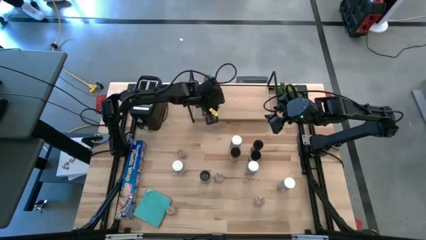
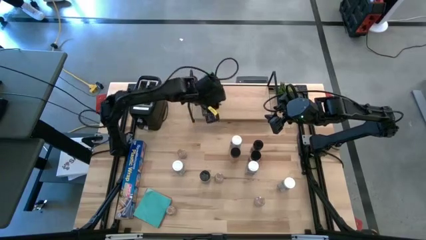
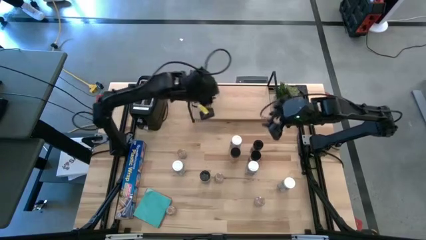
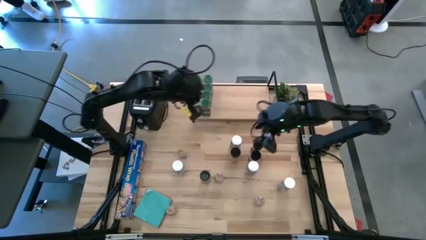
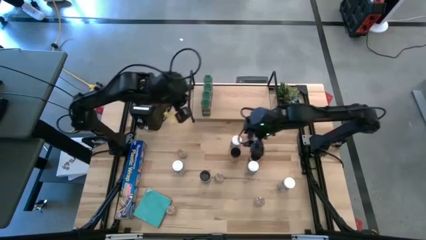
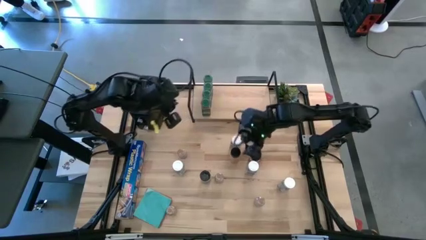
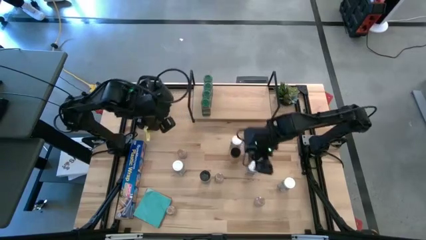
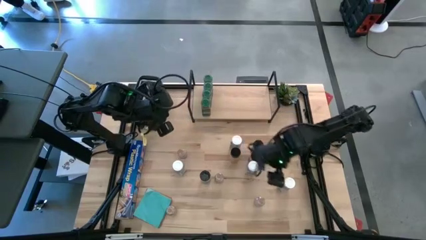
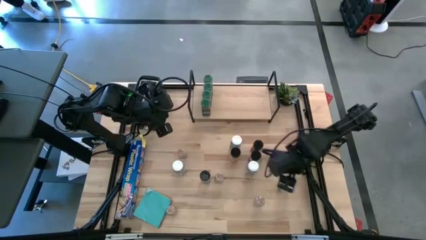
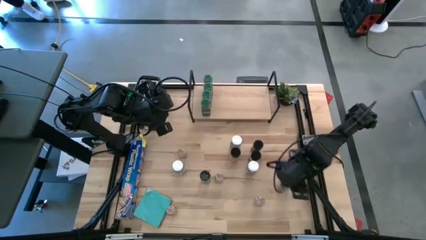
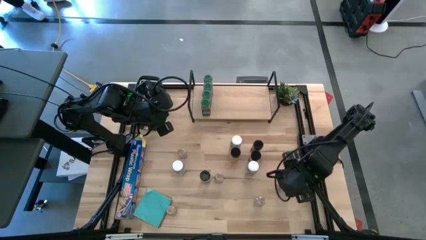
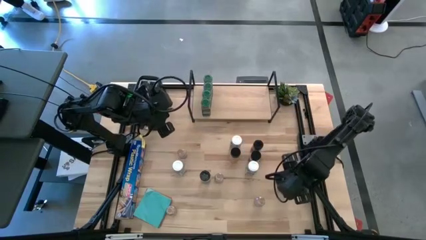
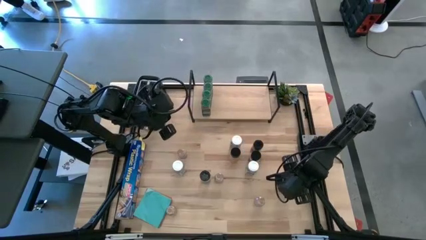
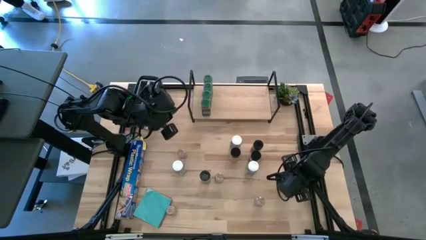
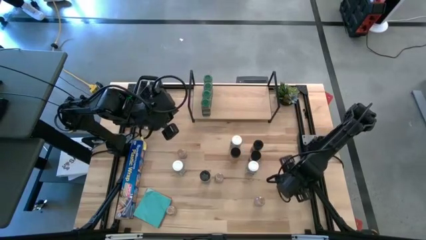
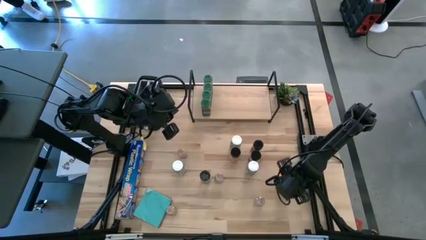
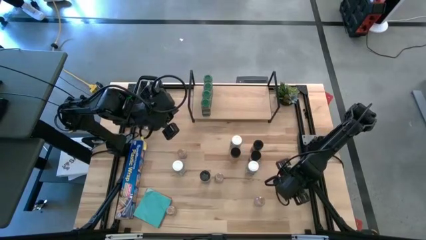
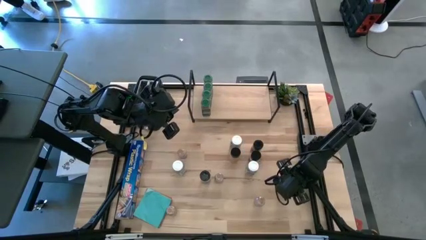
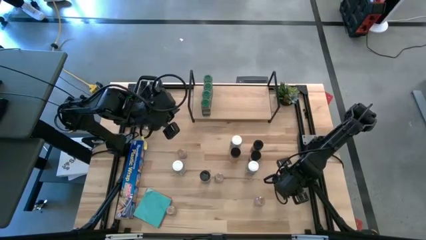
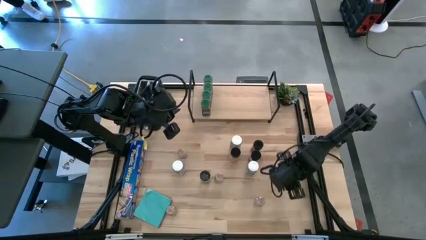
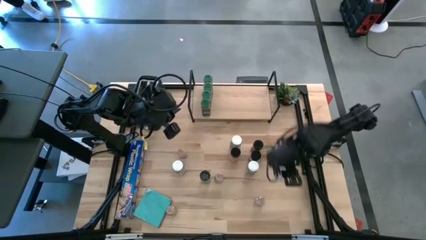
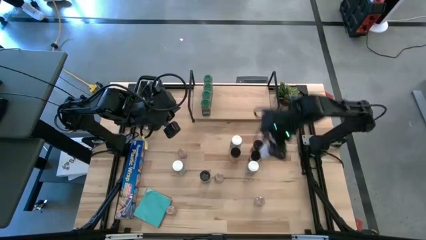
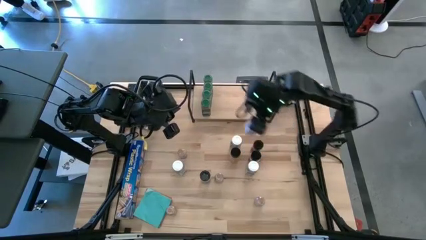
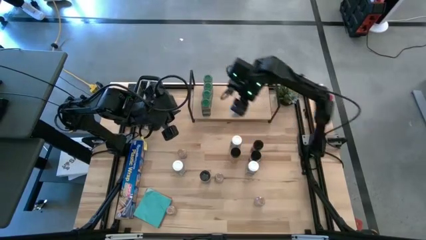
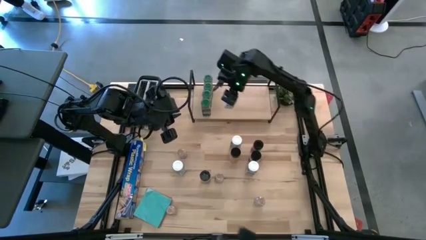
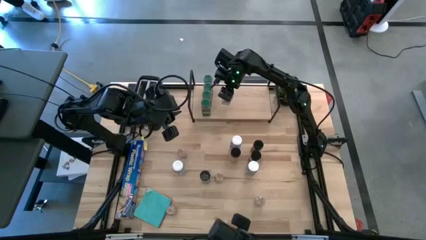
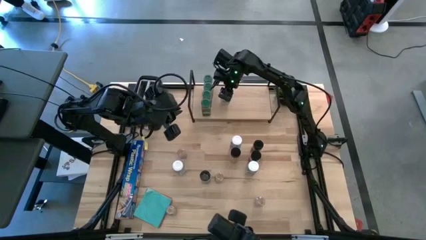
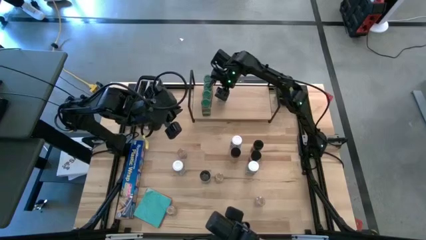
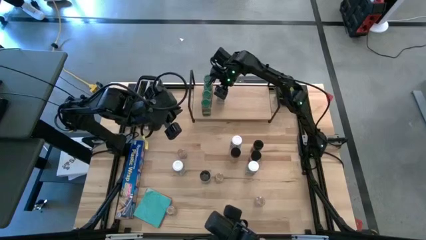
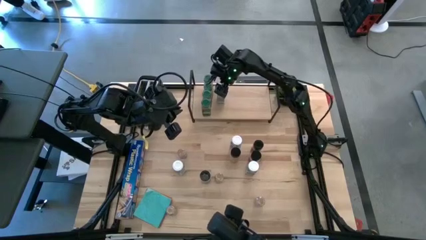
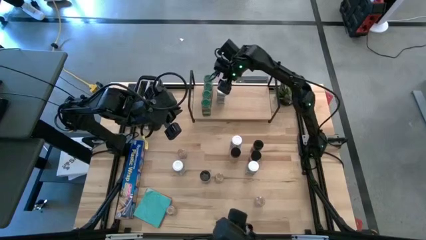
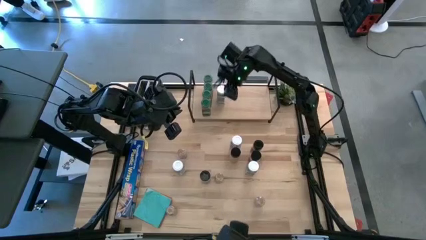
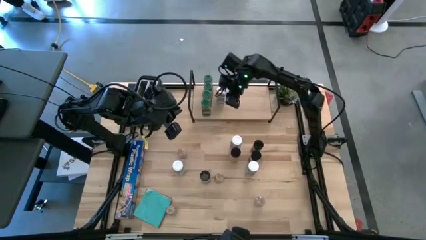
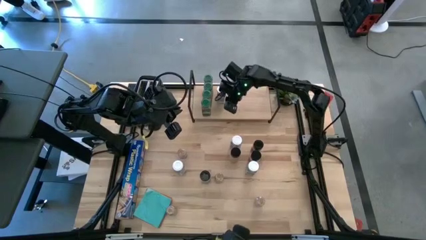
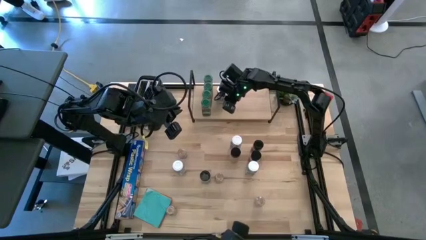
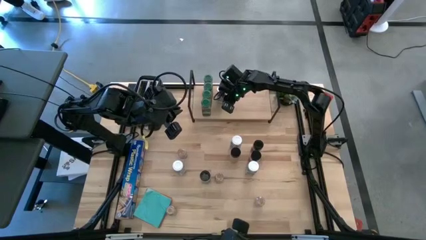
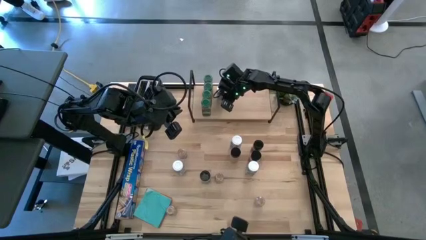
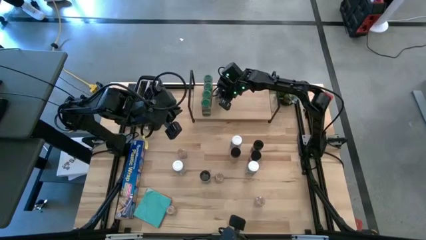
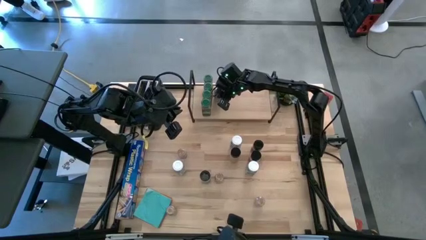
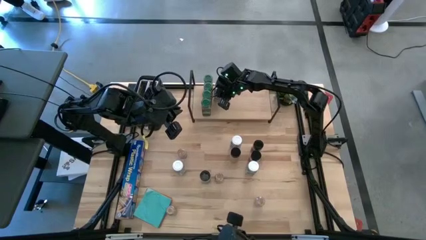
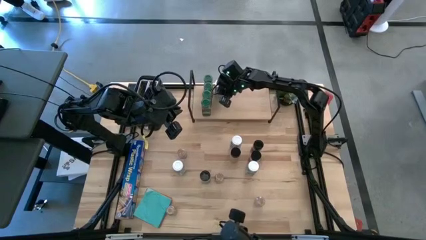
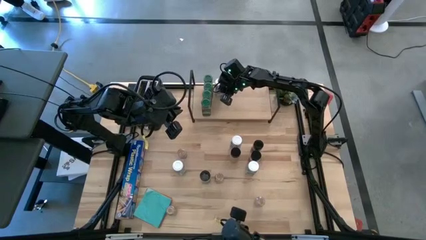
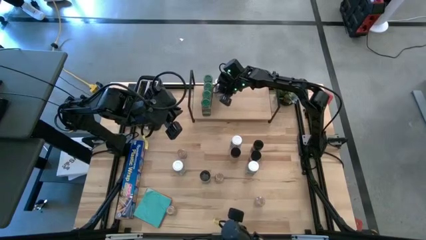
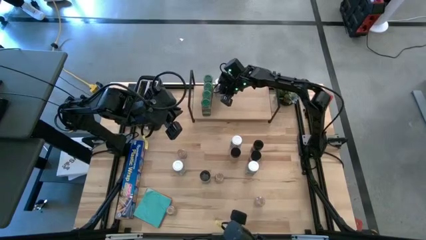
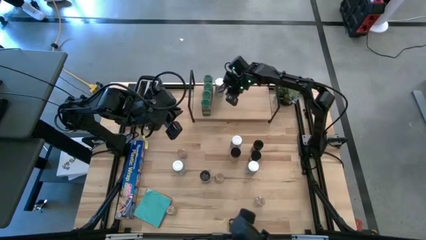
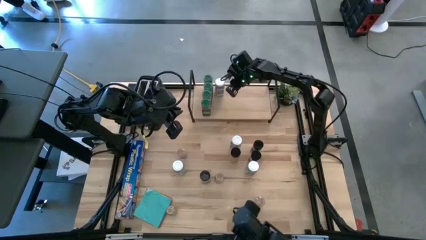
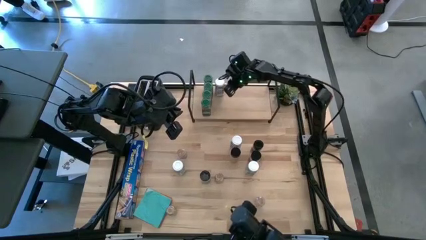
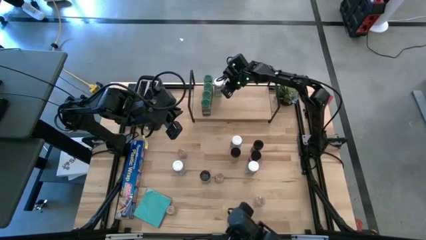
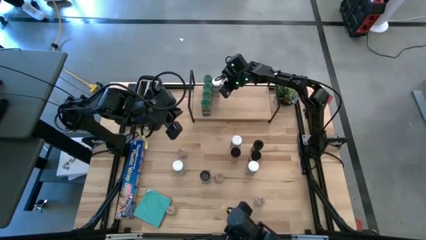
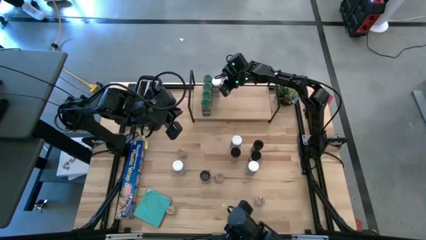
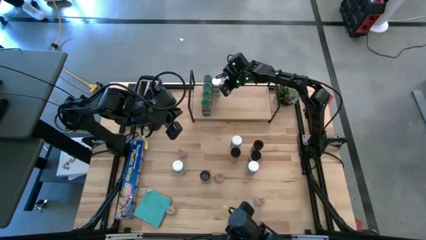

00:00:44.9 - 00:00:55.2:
Task: Shelf spices
Put the bottom right white seasoning bottle on the shelf

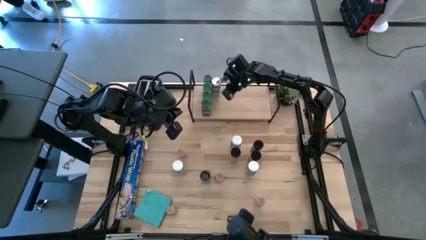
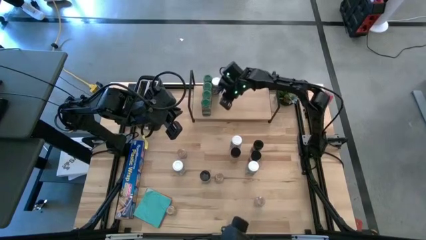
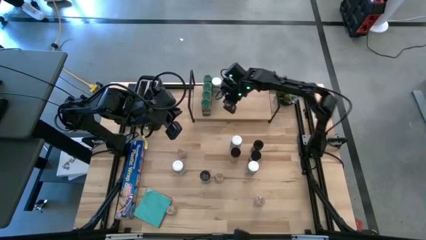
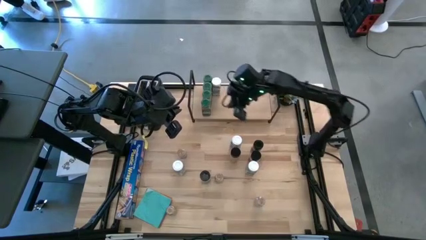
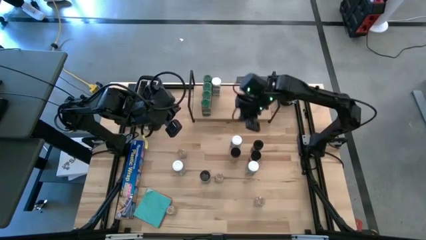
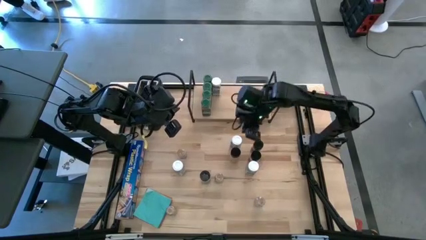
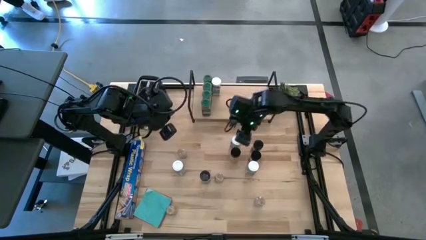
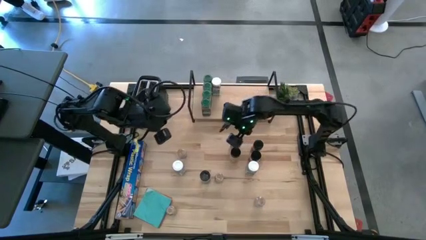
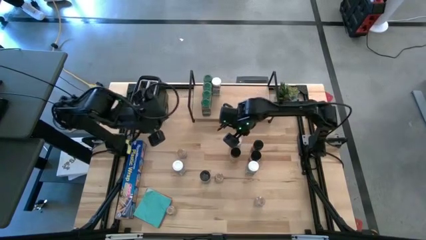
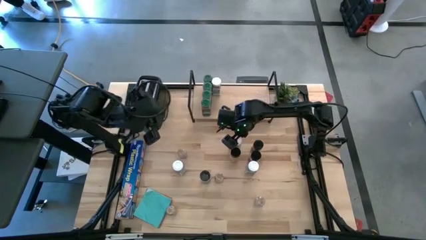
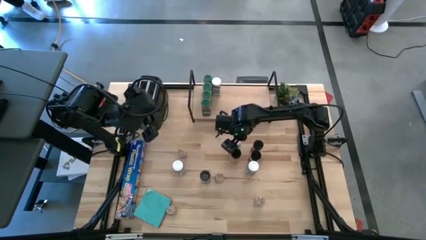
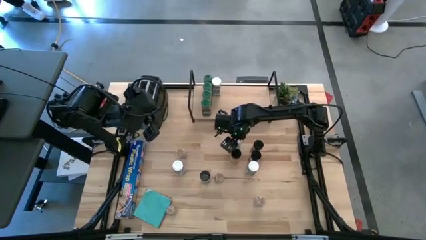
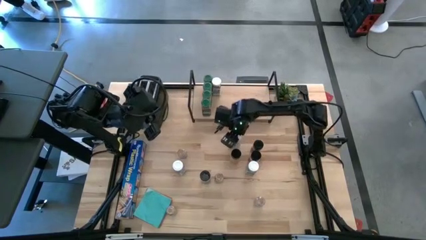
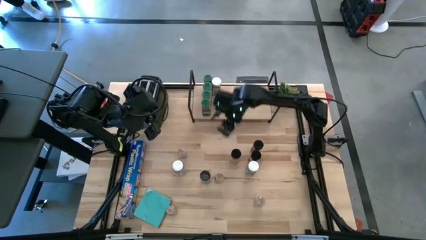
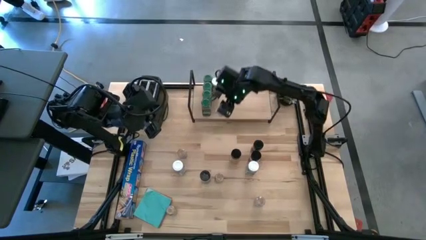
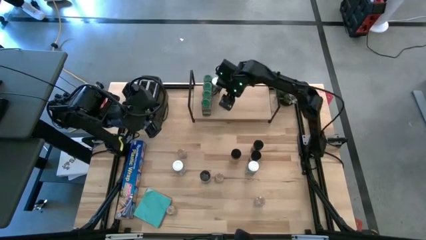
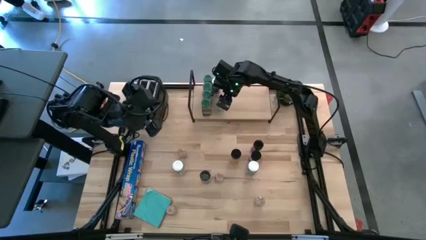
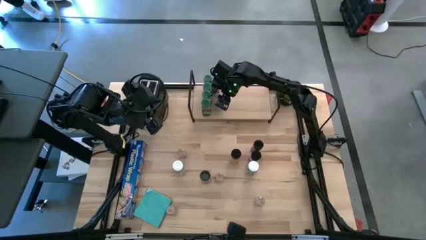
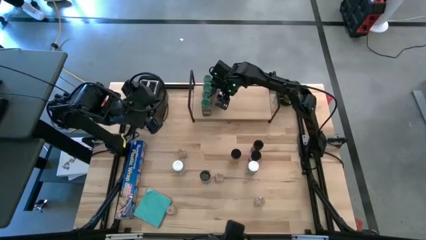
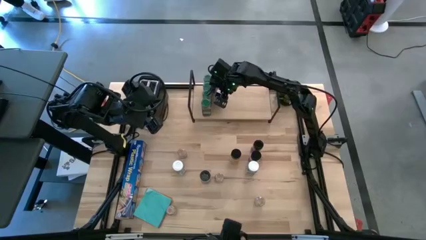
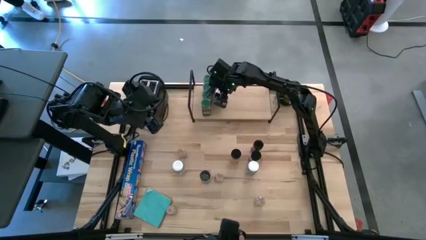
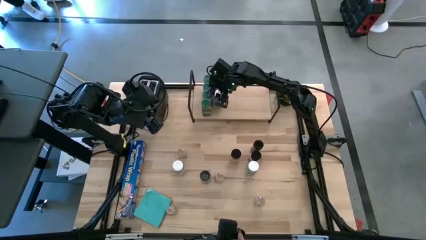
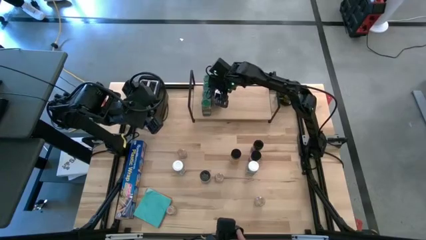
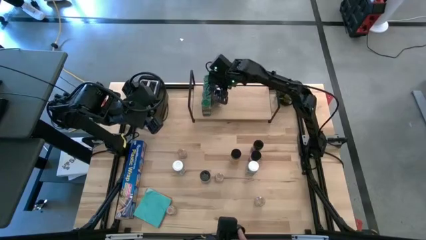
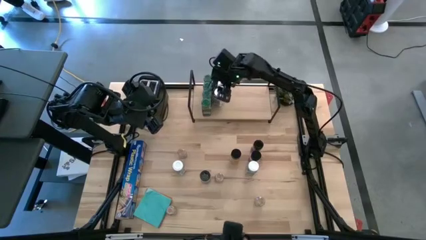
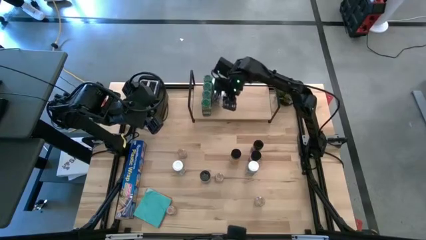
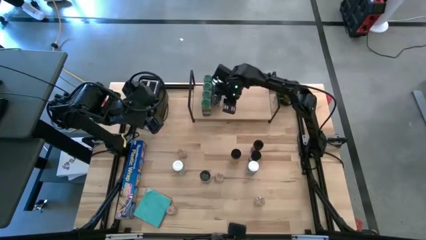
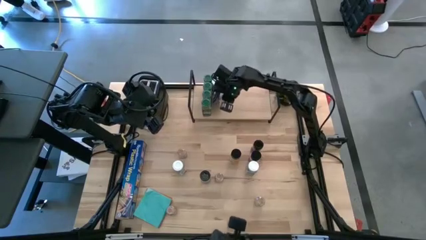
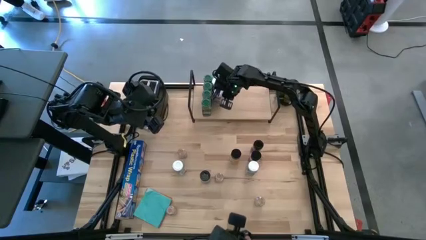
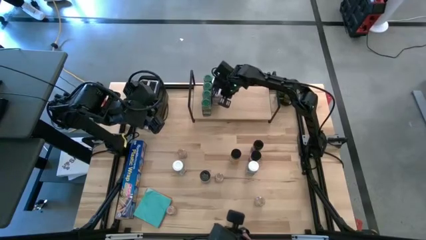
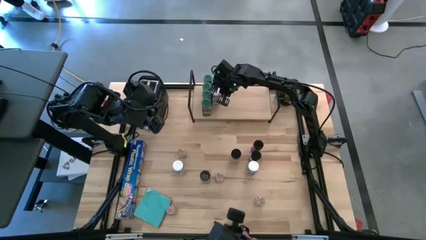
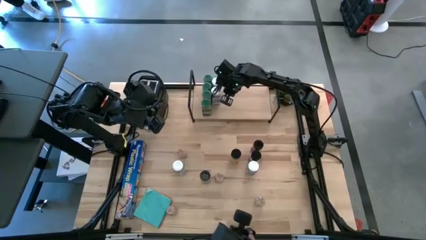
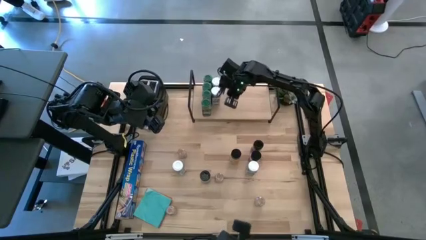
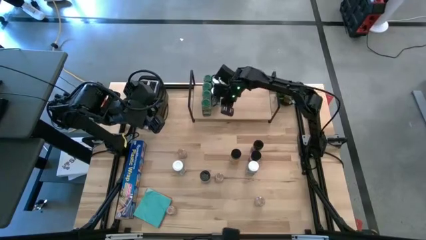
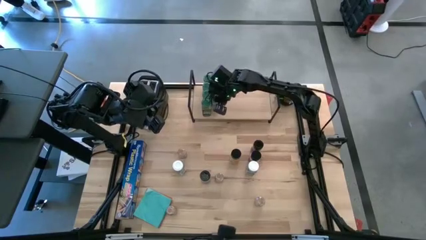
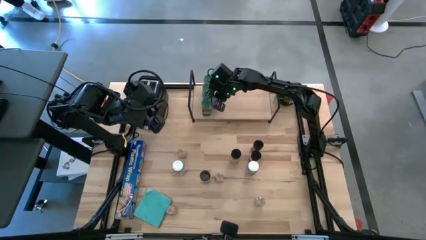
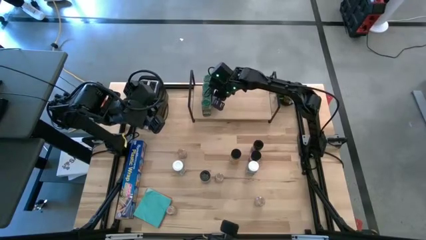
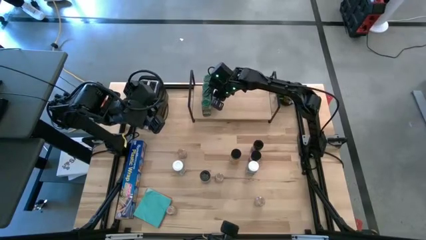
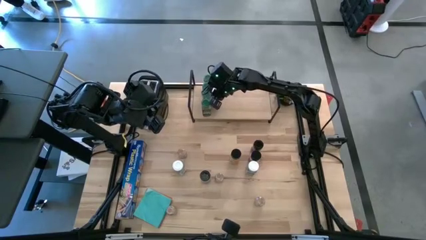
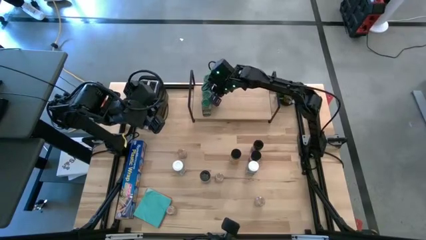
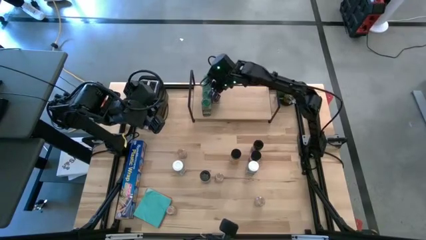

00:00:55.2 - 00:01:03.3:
Put the top white seasoning bottle on the shelf aligned with the other white seasoning bottle
